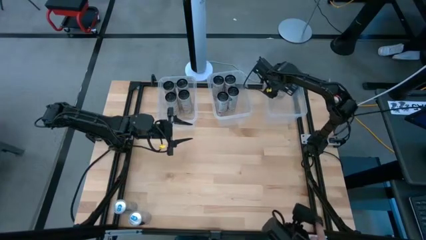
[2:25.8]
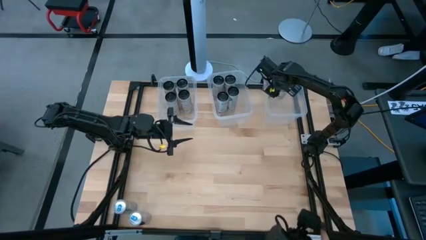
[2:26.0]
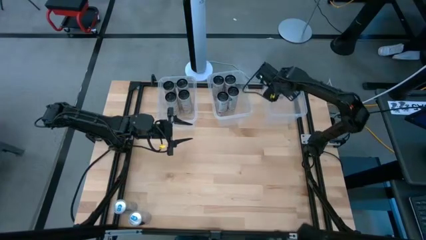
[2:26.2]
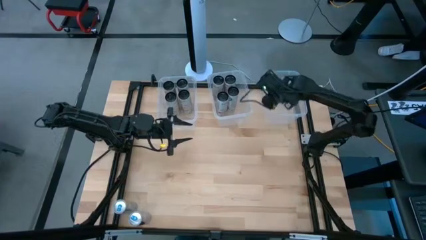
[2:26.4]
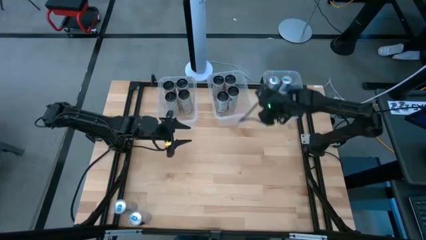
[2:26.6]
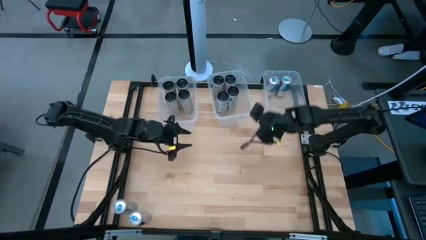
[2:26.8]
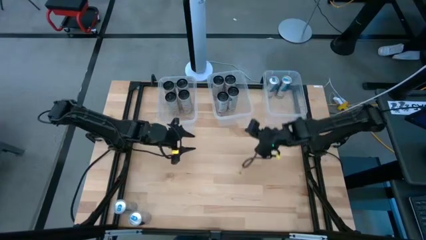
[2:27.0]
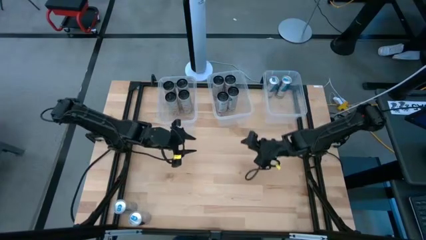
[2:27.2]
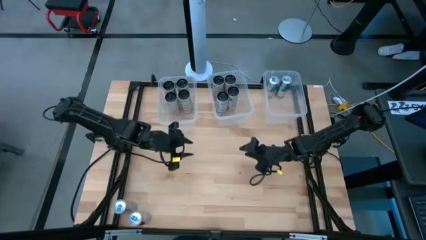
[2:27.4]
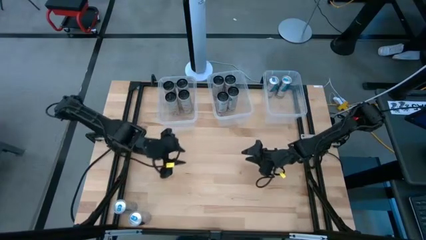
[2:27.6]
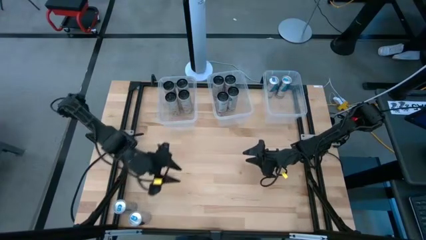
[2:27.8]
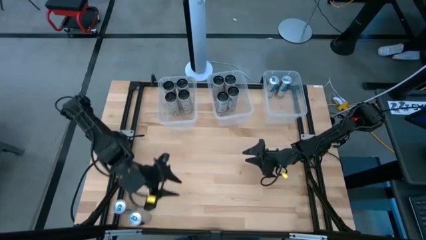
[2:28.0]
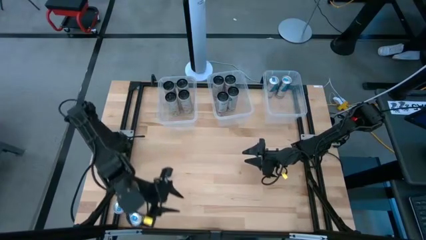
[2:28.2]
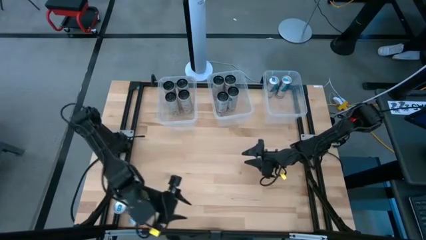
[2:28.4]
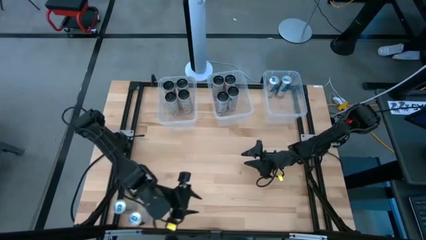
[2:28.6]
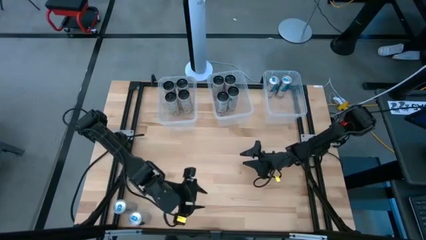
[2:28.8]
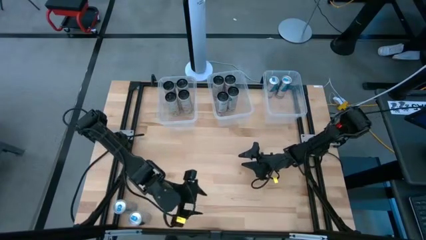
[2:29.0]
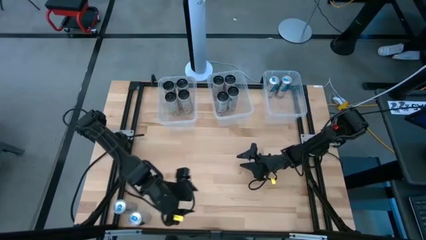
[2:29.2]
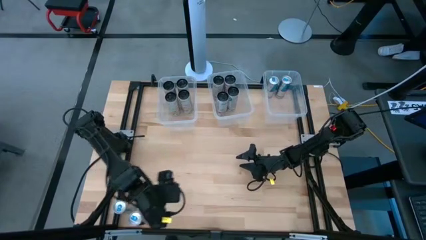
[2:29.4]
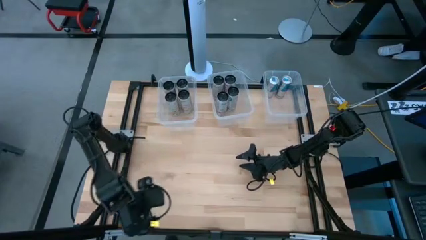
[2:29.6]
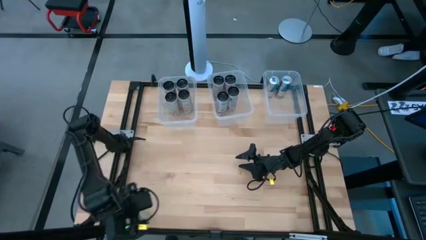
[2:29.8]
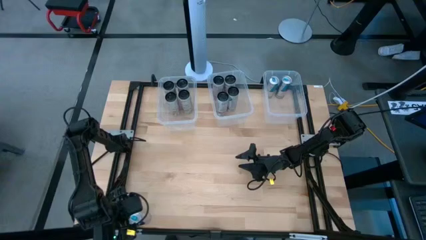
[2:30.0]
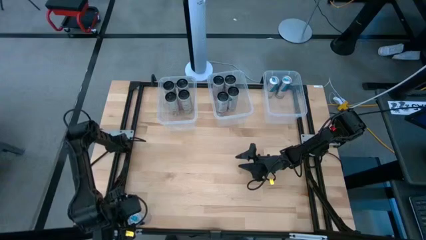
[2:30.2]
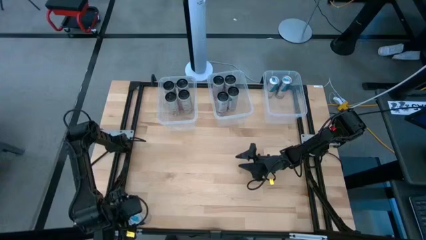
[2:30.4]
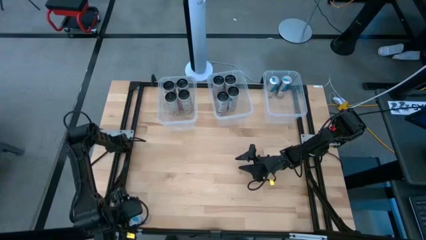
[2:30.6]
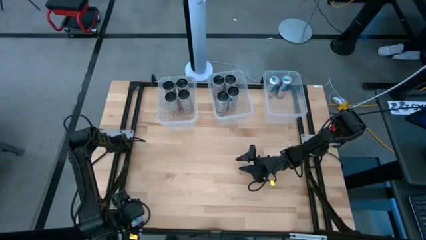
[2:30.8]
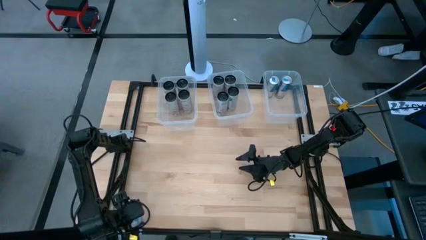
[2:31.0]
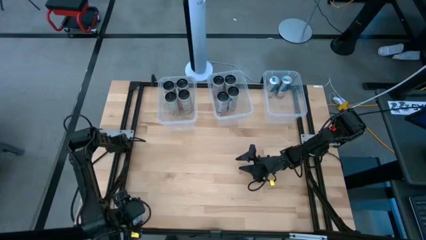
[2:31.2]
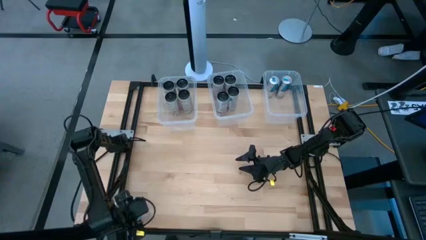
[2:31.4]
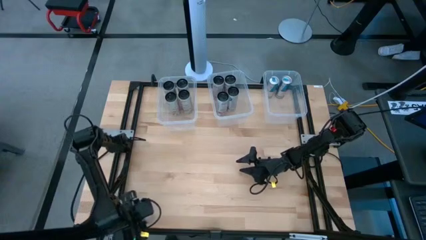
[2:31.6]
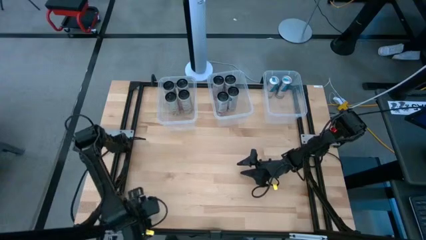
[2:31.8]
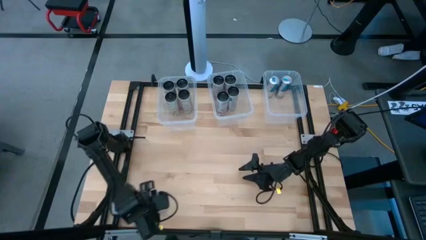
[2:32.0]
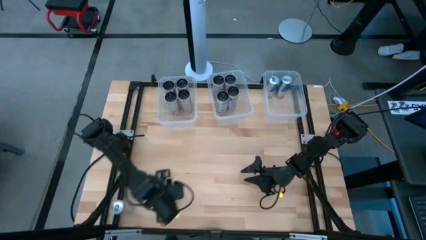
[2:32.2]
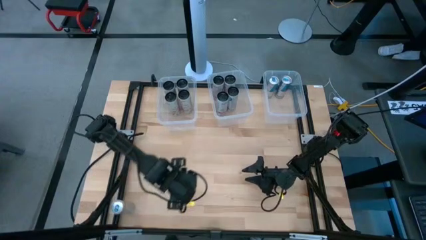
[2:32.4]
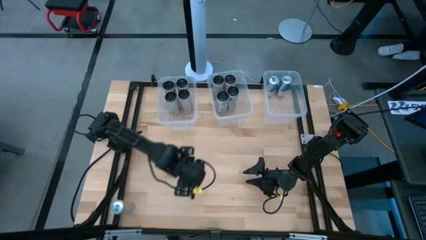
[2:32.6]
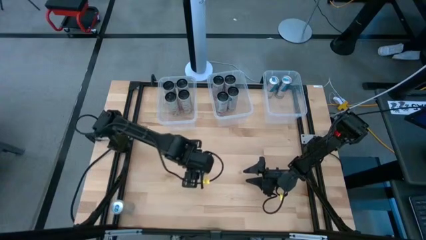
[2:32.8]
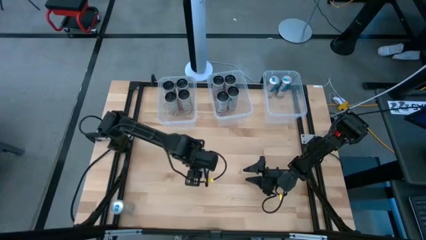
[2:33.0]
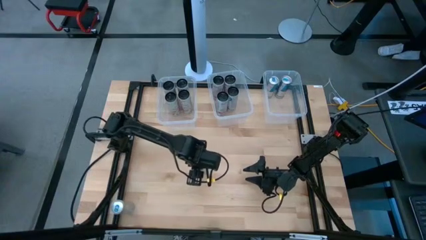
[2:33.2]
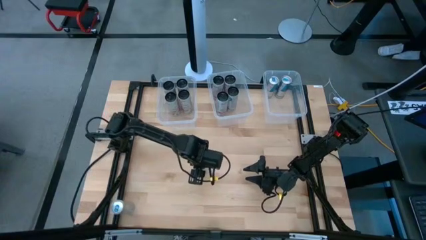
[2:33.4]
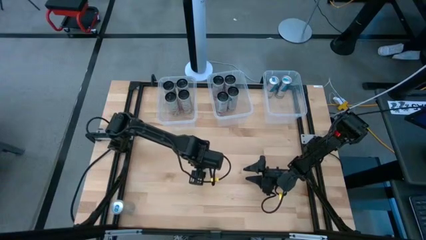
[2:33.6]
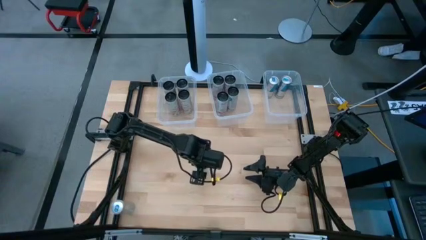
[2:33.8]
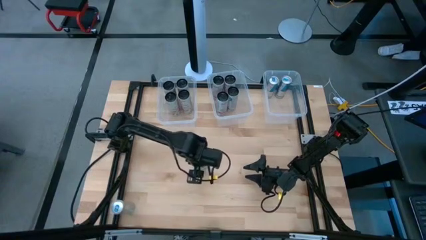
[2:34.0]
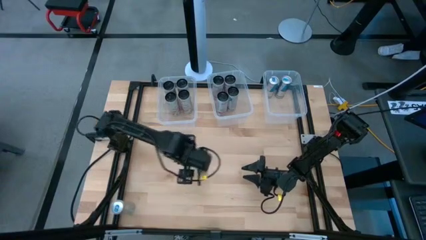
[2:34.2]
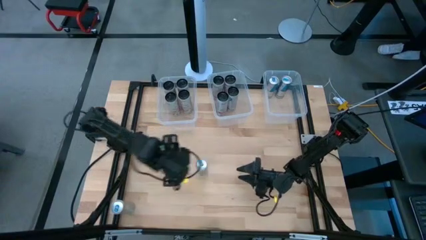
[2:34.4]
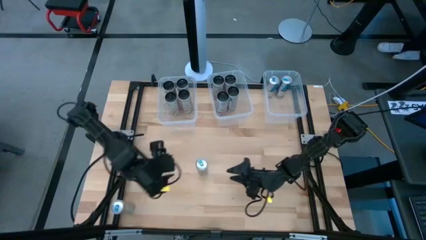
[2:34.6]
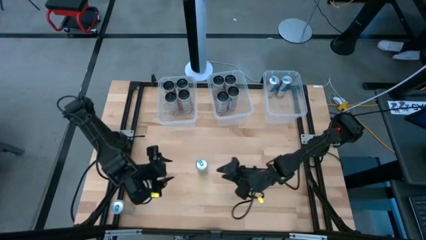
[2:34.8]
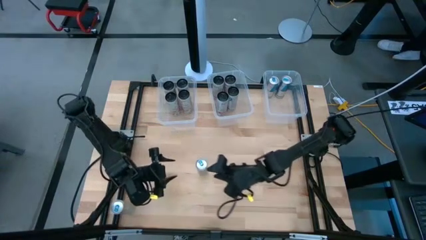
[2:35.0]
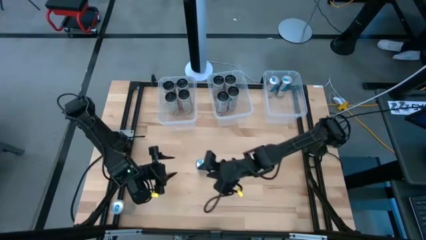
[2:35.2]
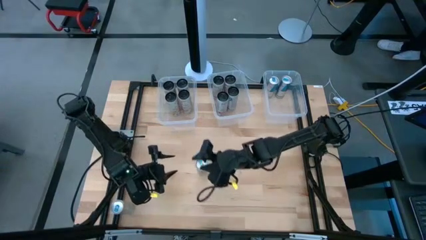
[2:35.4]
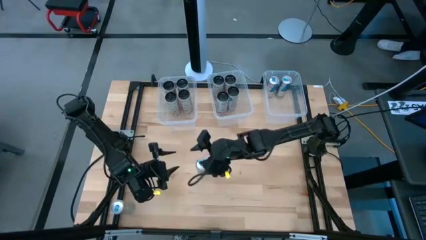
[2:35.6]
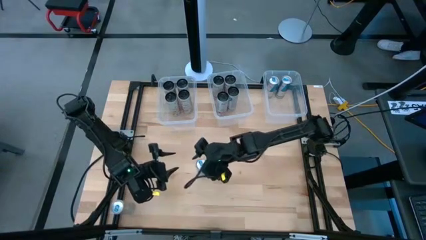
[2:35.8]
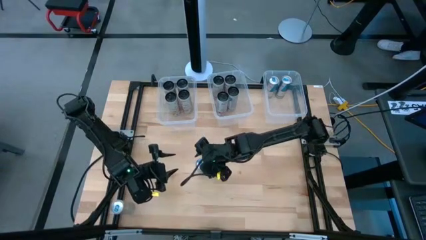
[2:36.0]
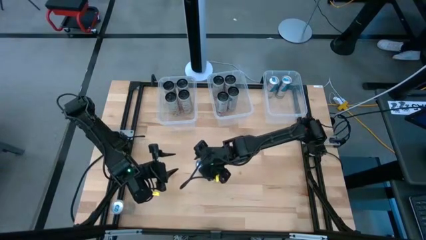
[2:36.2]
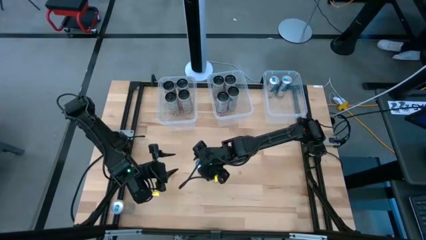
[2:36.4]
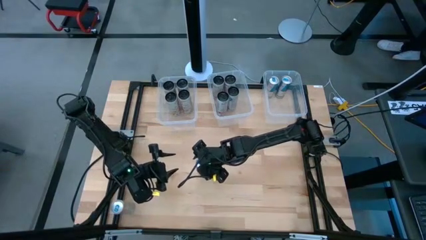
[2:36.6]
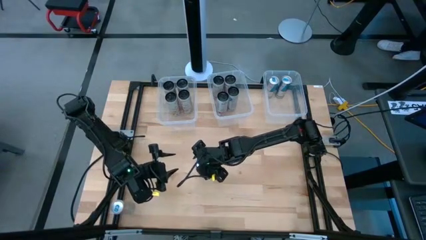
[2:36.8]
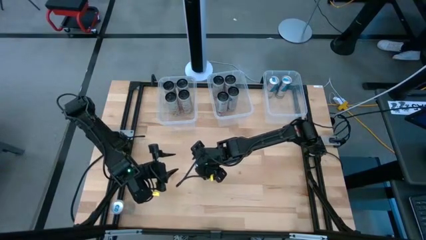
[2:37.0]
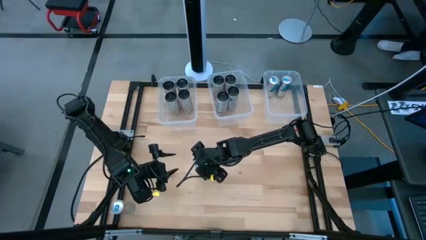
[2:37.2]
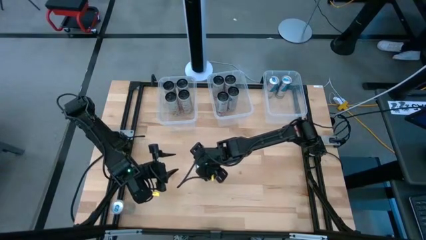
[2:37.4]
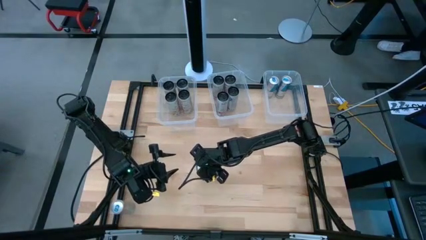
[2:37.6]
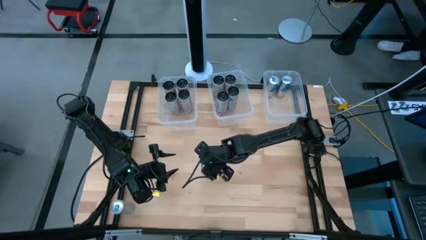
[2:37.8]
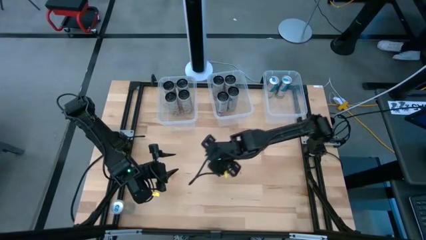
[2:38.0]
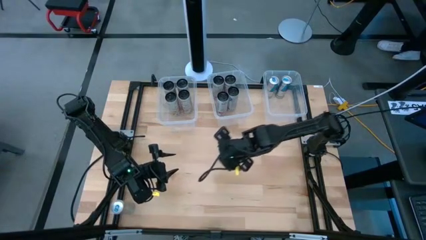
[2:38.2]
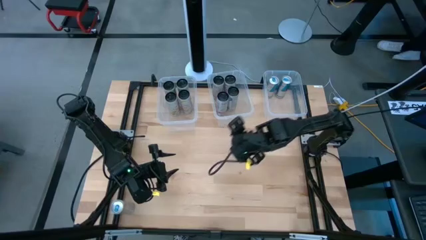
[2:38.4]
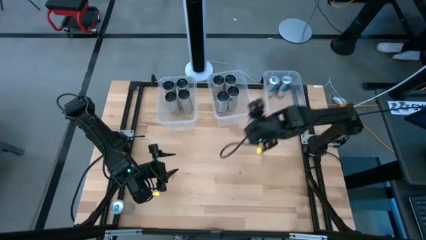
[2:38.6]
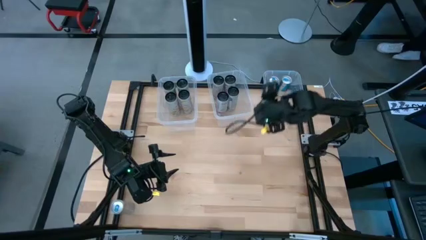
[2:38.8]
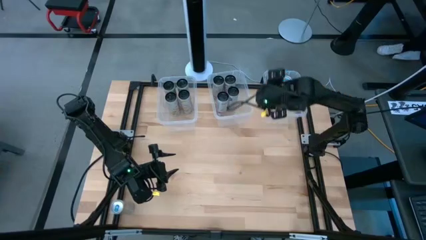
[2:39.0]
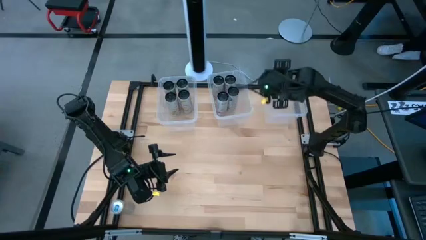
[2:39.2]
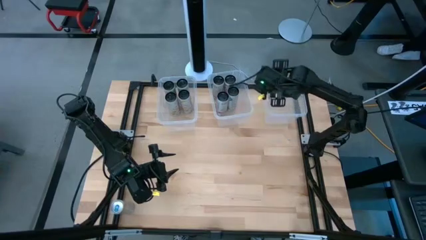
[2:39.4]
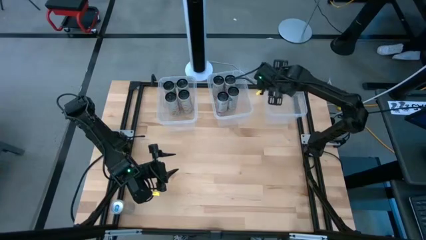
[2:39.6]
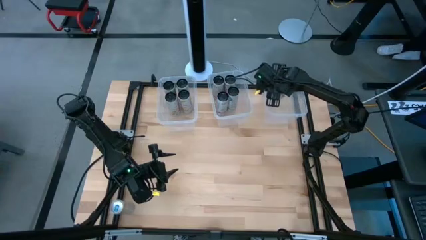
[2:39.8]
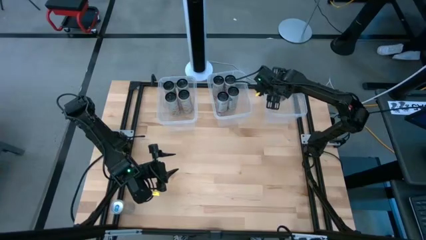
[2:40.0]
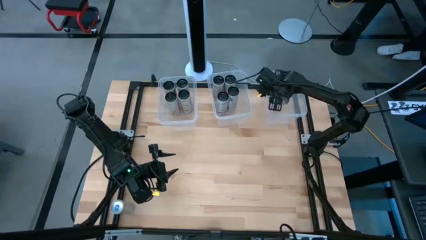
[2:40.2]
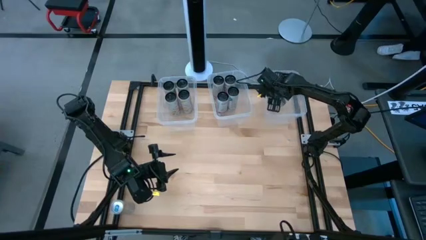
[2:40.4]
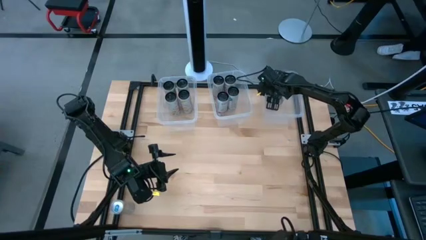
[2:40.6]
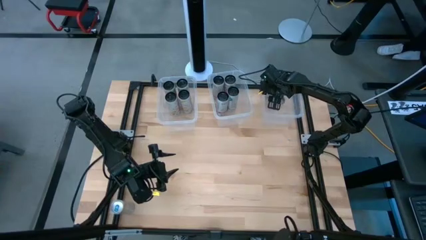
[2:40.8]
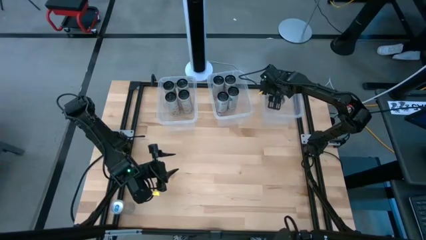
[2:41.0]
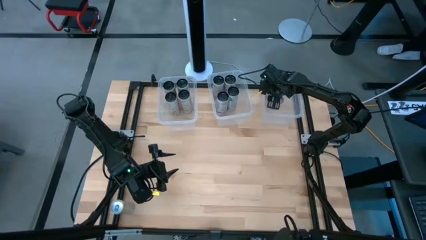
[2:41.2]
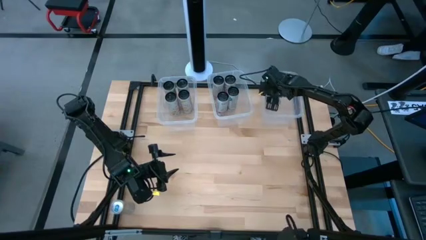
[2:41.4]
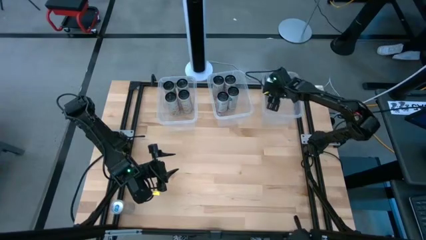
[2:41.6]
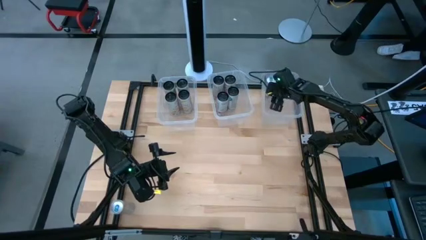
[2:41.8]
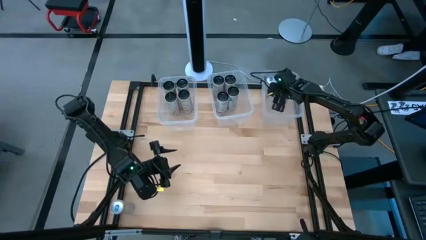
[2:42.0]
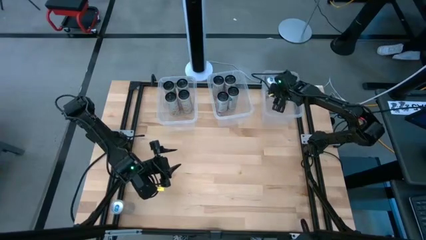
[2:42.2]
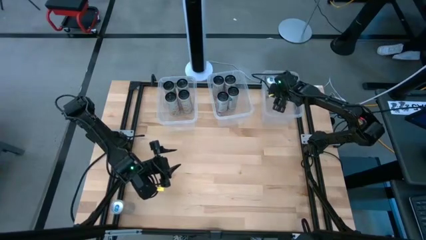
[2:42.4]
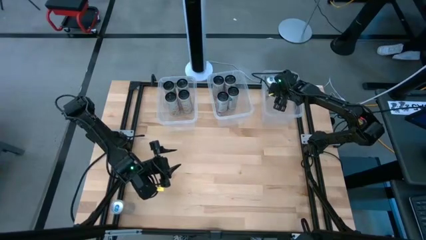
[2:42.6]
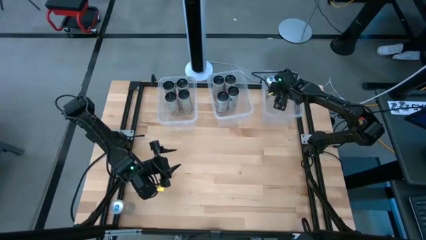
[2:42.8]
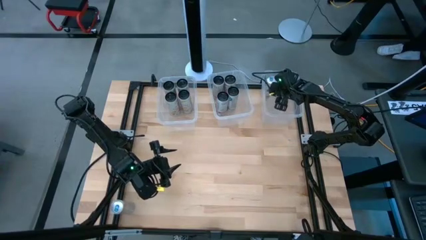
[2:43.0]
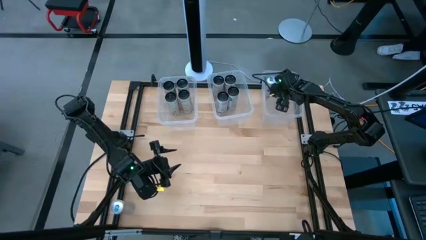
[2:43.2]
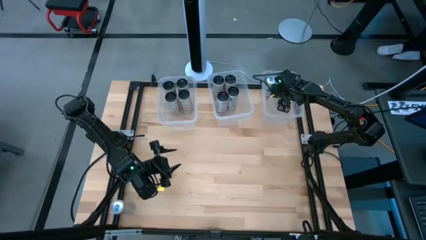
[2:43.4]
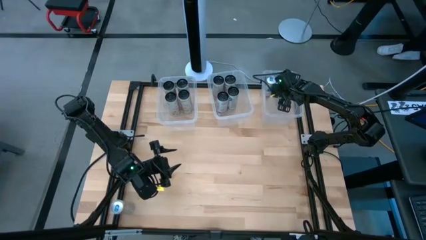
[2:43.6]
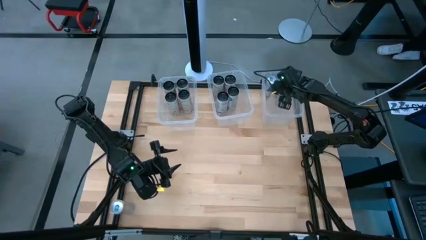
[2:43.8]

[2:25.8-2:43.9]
Task: Sort soda cans
Put the right white and blue soda can into the right transparent bin
